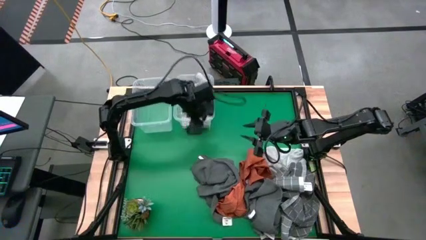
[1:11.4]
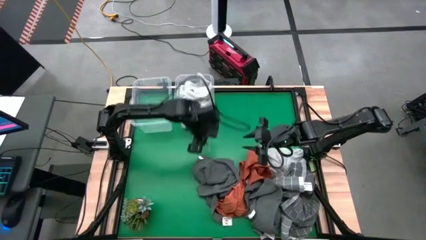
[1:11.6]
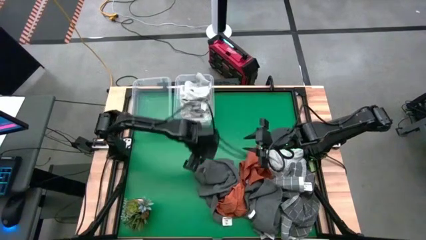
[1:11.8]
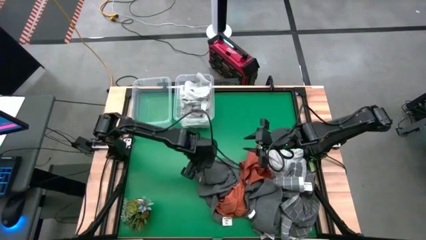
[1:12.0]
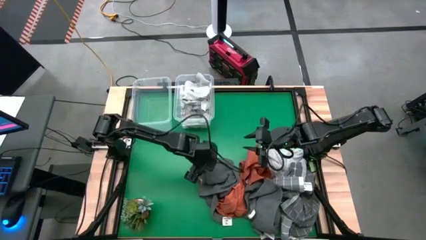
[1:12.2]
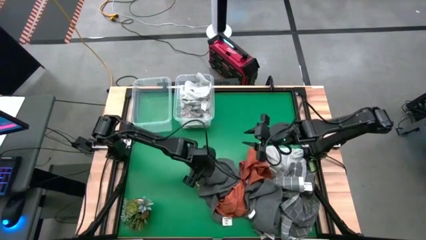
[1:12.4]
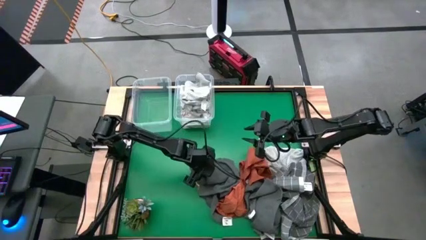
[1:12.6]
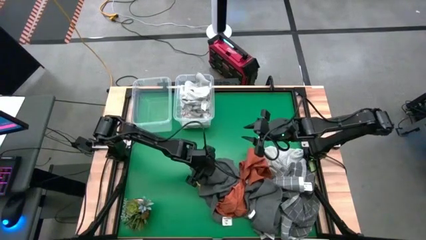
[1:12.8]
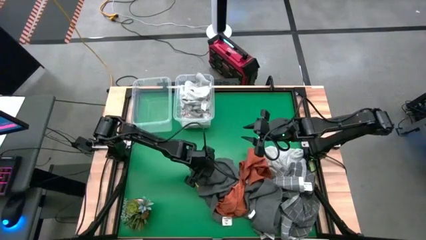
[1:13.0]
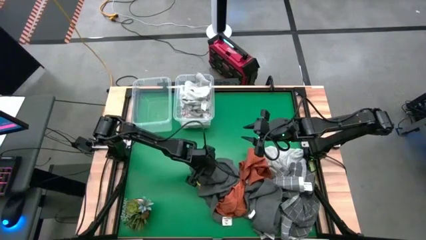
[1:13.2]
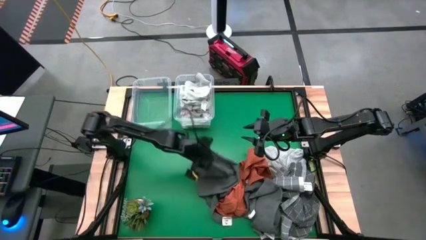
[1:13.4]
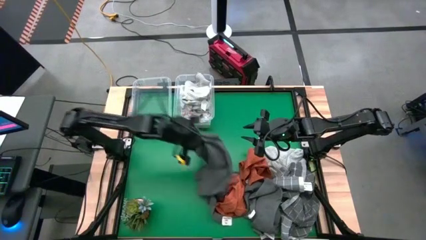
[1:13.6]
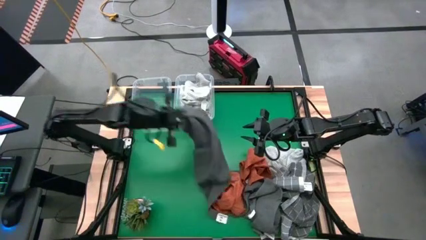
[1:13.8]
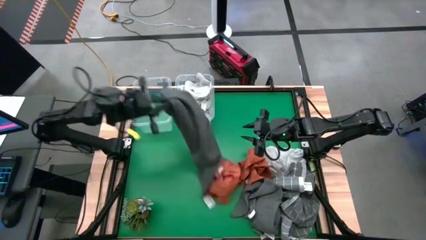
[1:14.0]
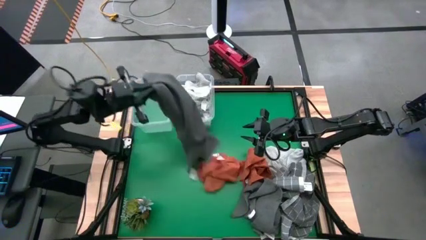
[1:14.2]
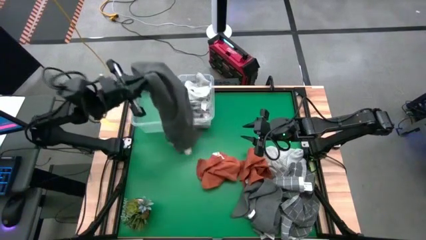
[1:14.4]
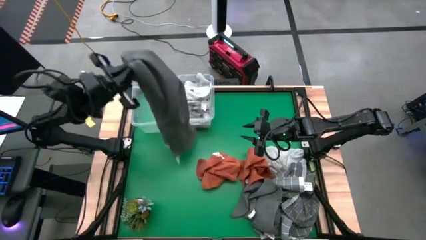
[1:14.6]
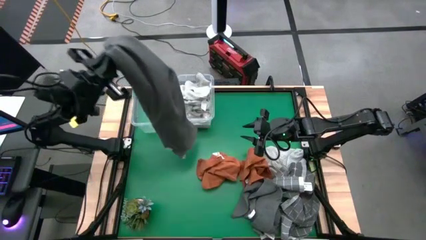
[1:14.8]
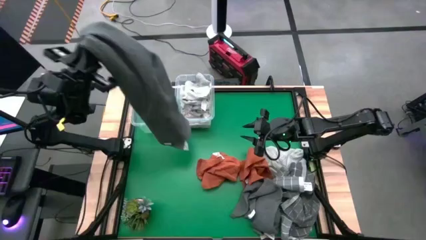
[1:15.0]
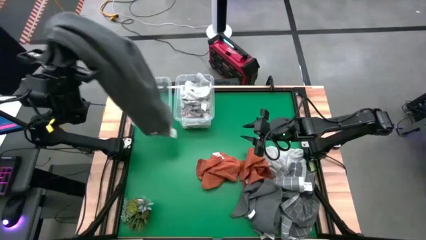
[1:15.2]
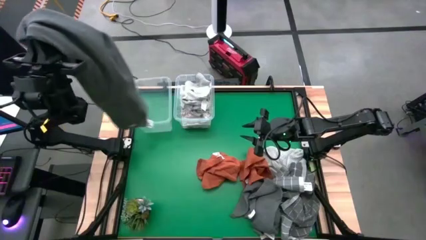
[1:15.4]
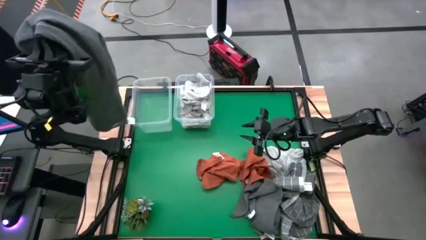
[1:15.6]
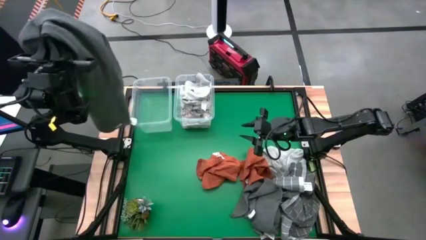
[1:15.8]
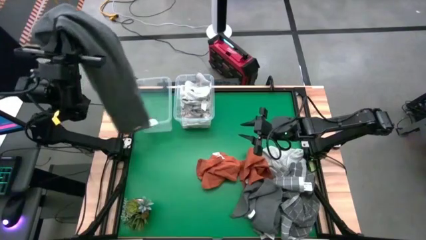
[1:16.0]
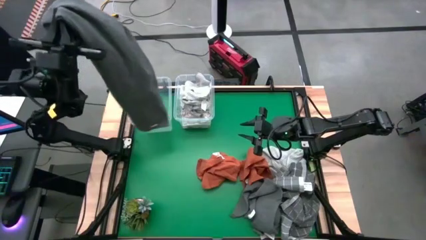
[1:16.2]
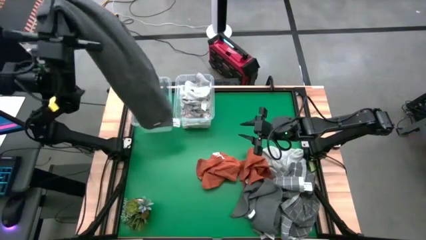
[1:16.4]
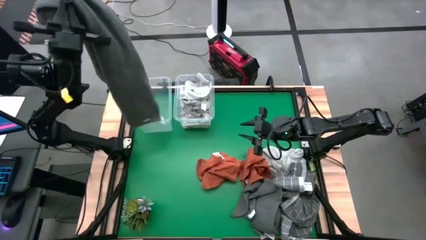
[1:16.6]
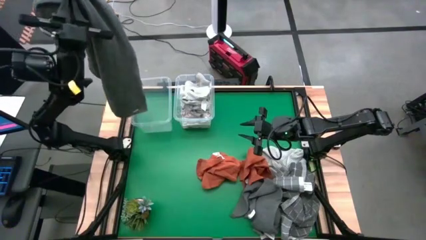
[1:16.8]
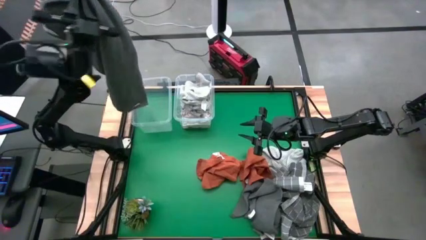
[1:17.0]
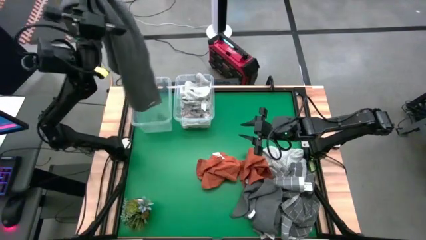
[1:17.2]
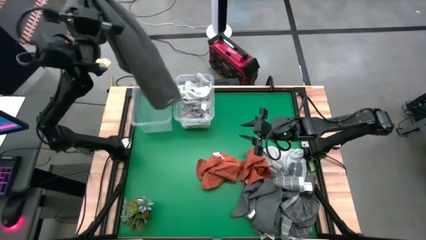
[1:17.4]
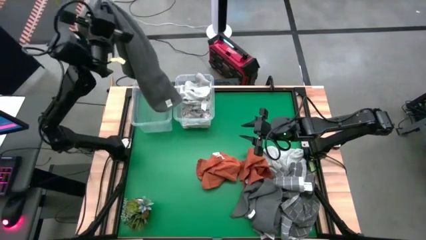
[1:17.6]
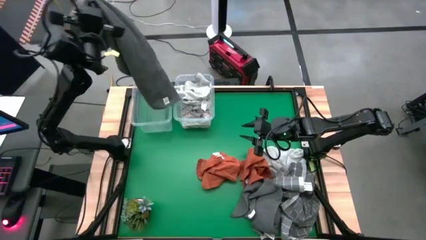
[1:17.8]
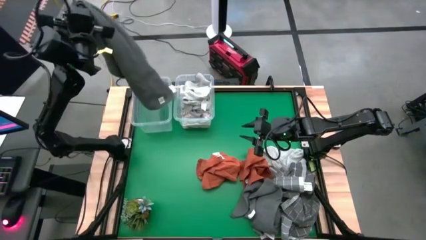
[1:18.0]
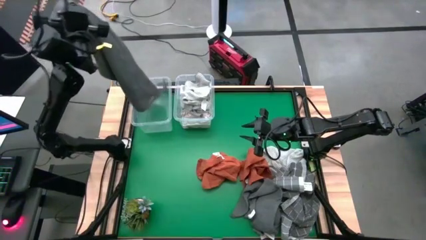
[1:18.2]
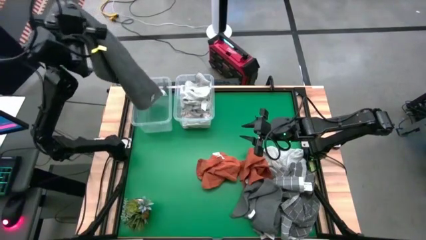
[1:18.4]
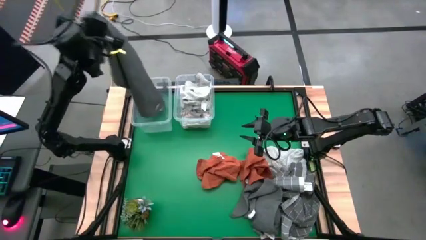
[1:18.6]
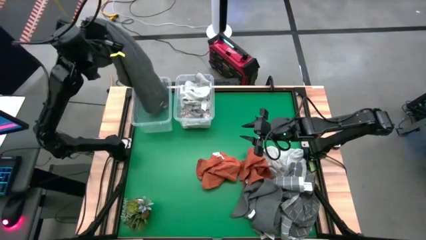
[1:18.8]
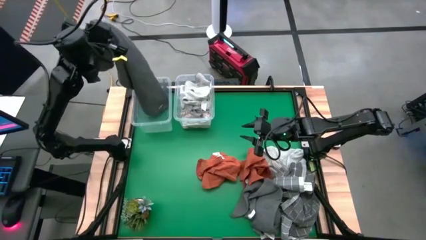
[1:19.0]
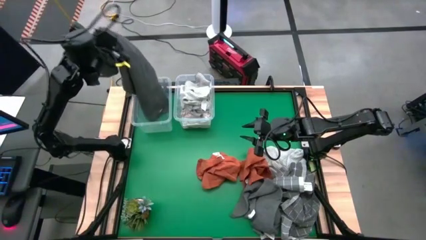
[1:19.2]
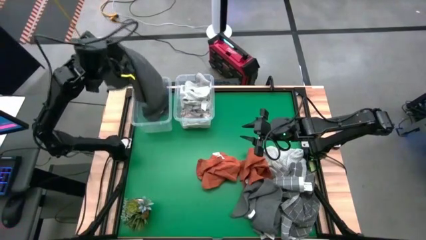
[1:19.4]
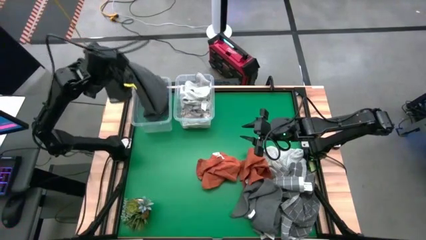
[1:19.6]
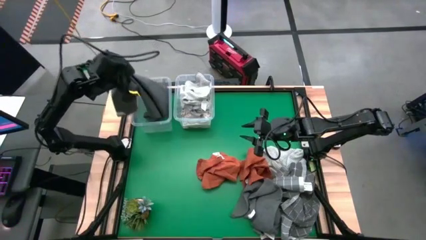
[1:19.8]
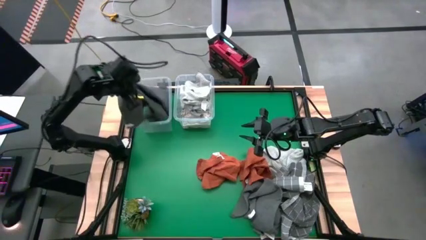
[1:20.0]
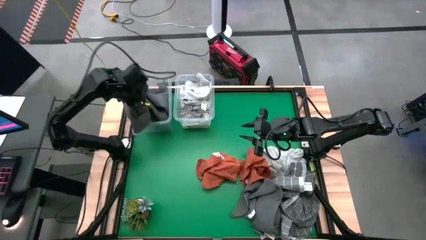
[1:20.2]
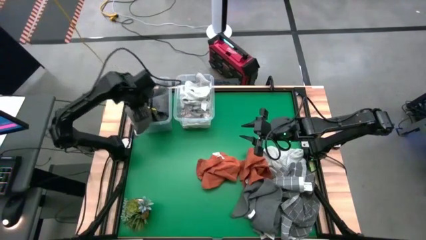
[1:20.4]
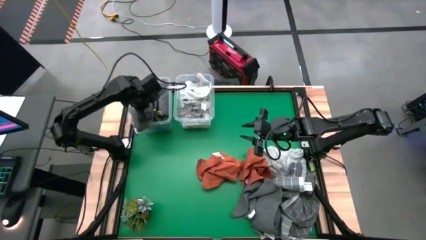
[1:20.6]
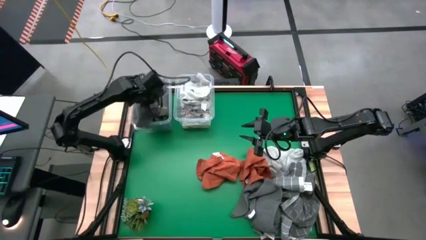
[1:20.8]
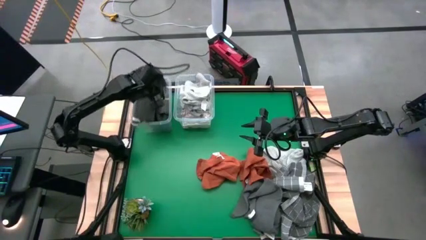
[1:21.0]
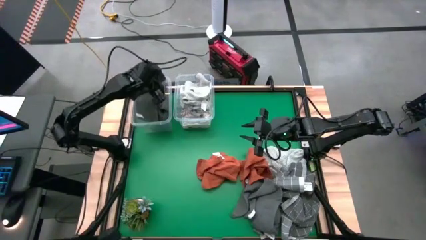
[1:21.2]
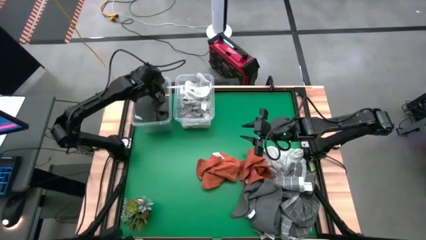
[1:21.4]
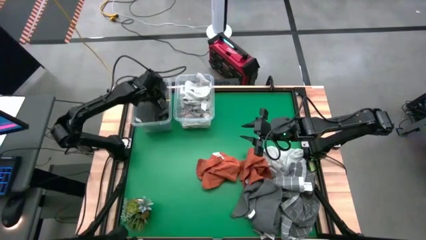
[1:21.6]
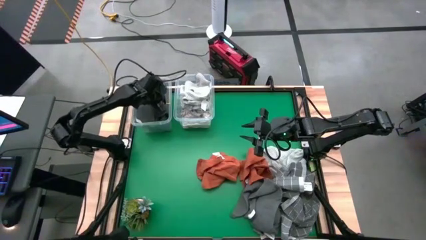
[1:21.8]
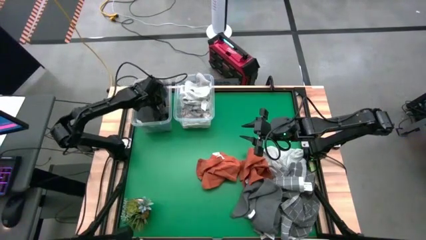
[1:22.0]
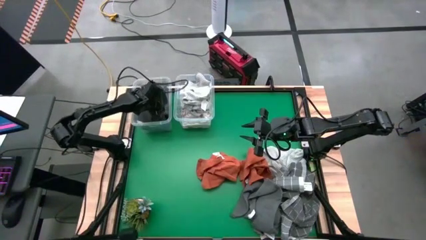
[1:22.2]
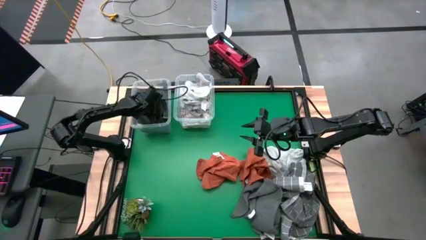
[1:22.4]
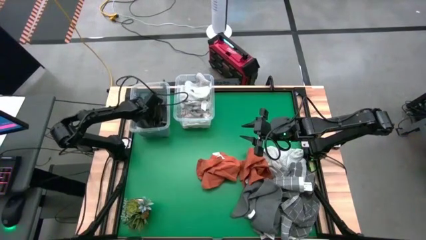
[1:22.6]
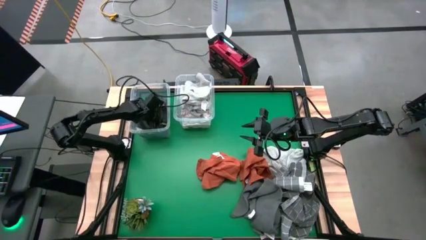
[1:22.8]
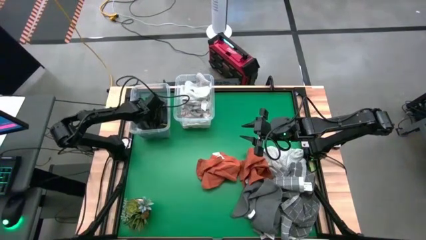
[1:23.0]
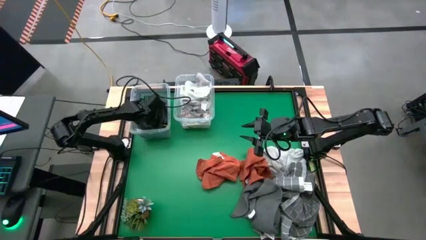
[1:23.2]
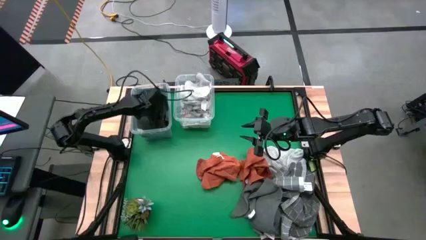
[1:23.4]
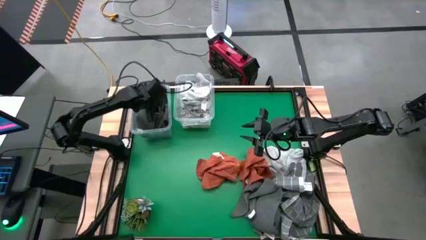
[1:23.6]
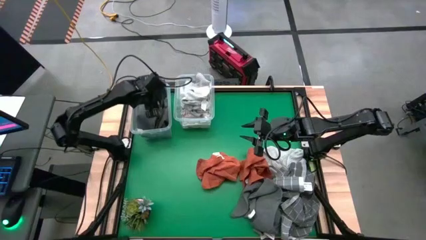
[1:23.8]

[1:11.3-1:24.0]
Task: Sort towels by color in basket
Put the gray towel into the left transparent bin

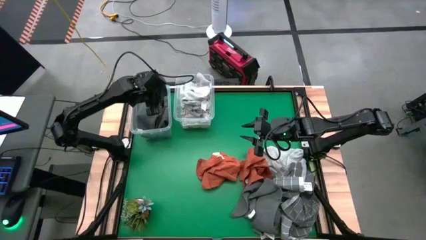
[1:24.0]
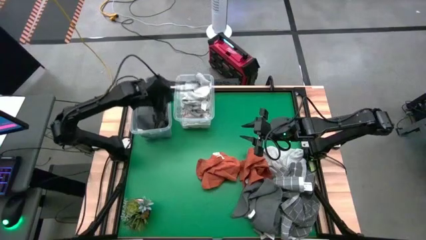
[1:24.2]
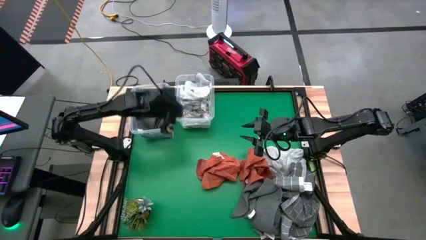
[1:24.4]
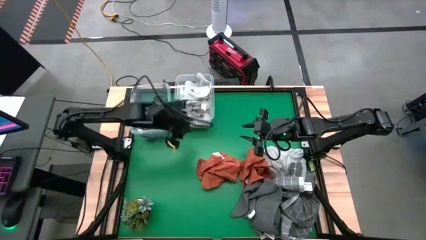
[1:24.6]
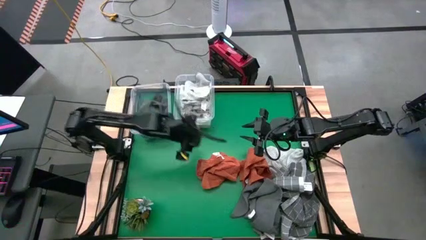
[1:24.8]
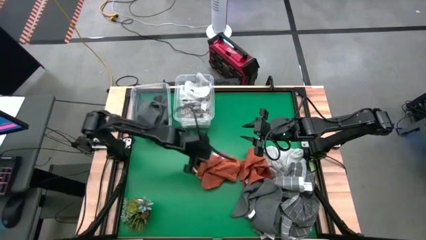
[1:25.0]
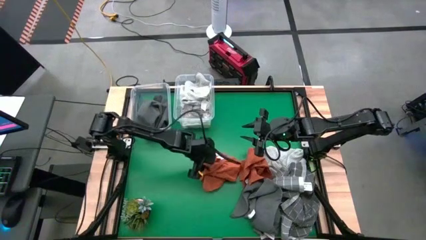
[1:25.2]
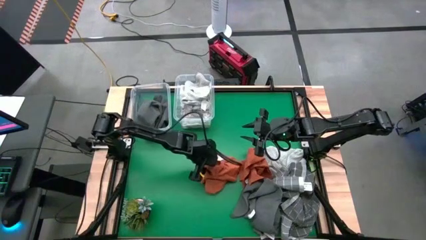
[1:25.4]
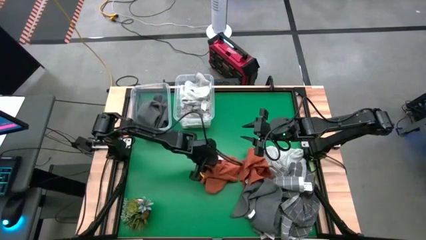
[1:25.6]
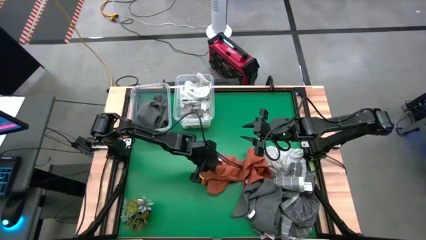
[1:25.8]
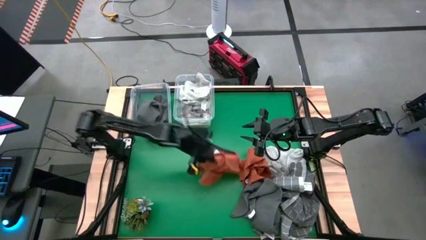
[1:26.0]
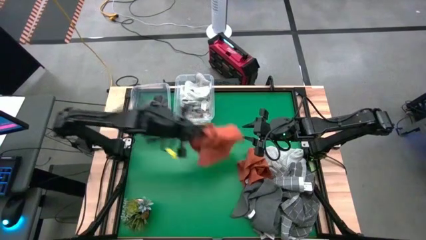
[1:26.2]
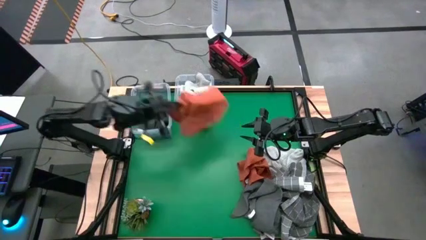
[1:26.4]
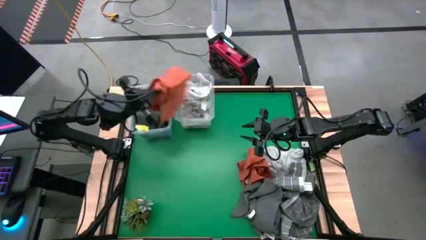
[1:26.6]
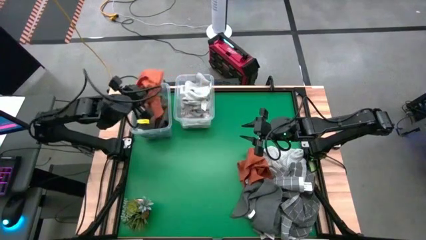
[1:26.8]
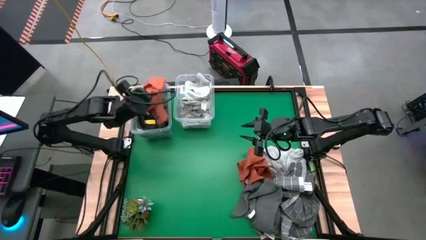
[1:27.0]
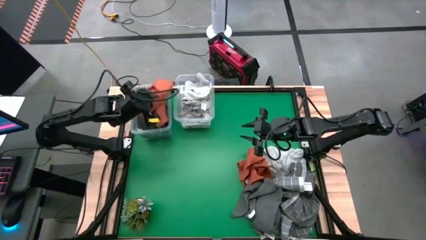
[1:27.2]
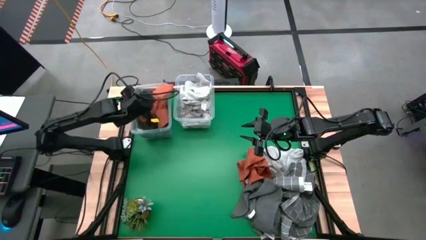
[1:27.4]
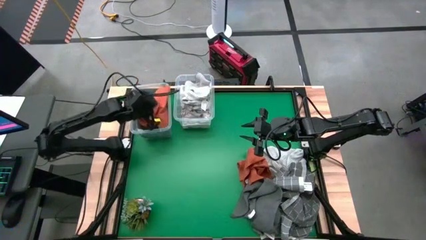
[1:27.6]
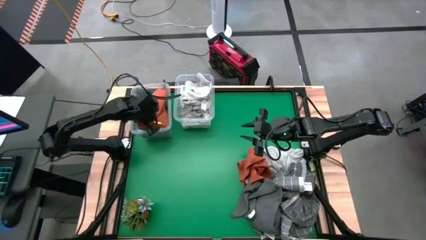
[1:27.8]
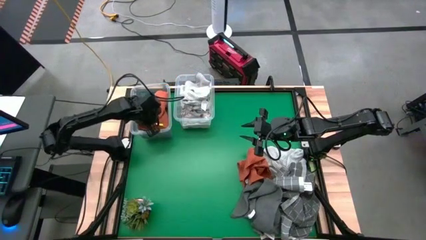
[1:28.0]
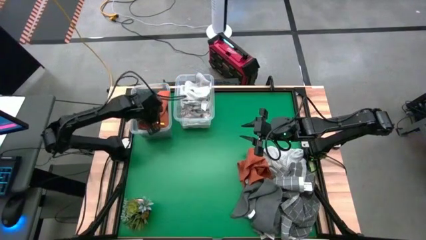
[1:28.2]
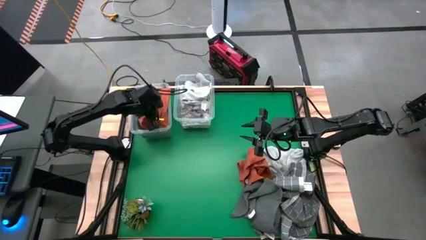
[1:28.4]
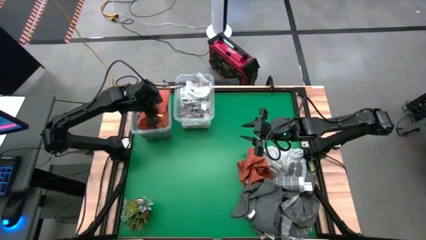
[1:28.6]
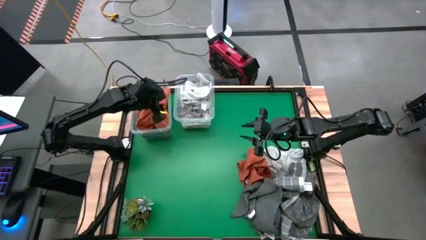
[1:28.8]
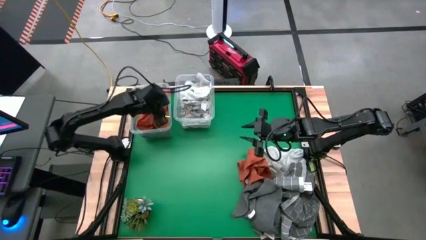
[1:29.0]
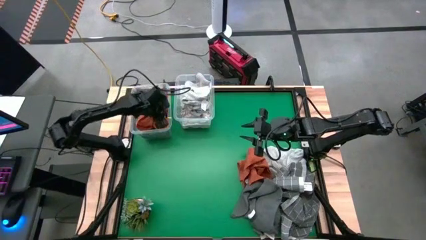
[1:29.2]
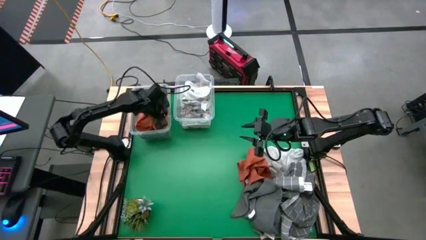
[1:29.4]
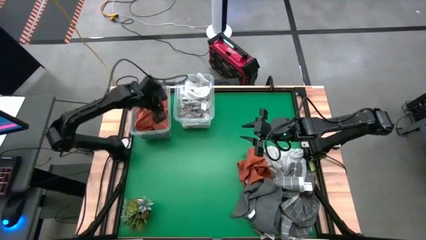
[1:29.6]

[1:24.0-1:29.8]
Put the orange towel into the left transparent bin
